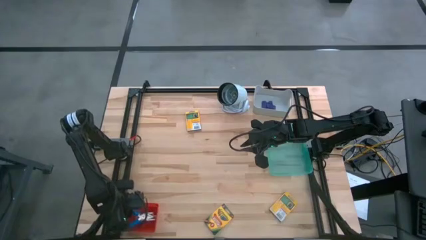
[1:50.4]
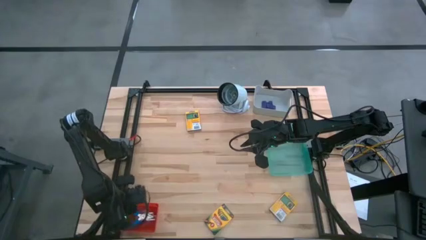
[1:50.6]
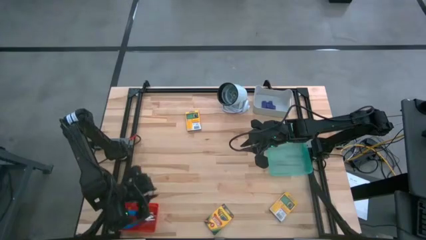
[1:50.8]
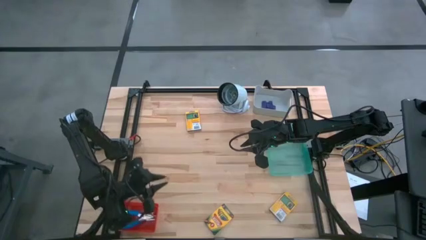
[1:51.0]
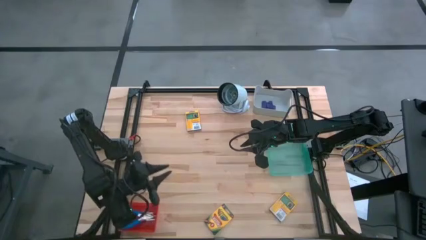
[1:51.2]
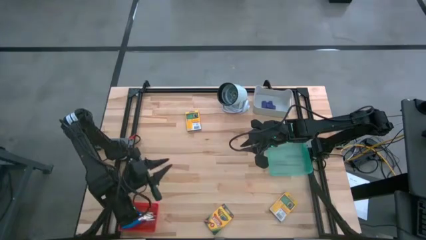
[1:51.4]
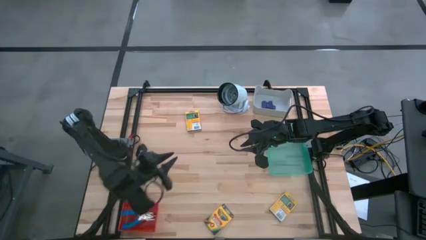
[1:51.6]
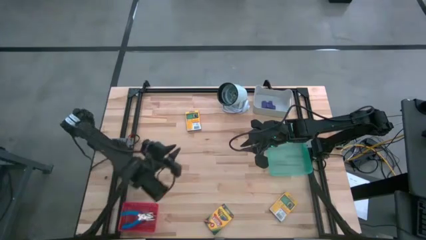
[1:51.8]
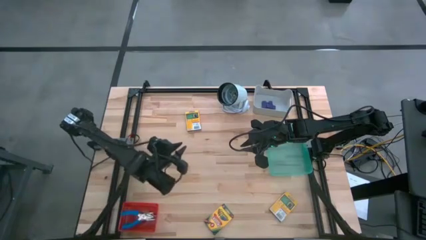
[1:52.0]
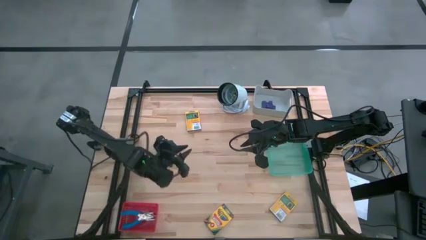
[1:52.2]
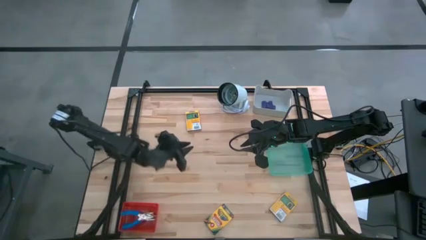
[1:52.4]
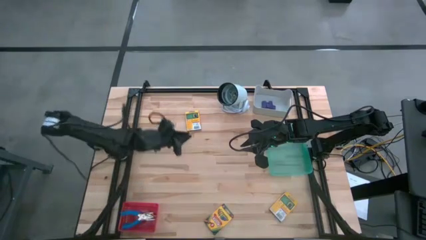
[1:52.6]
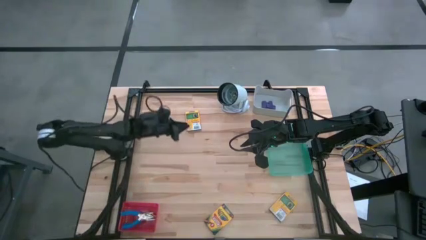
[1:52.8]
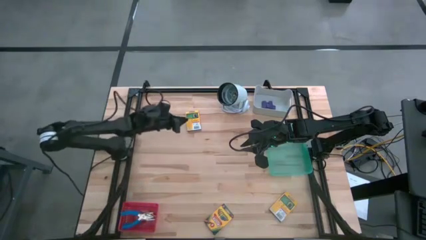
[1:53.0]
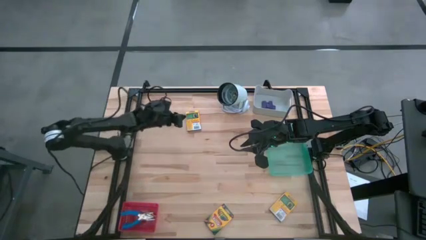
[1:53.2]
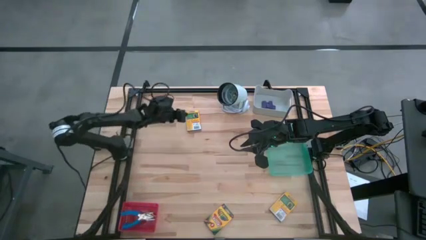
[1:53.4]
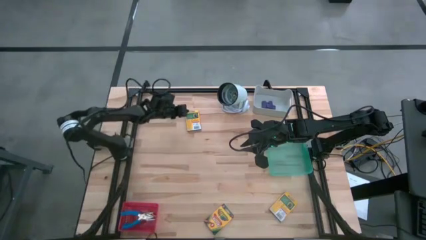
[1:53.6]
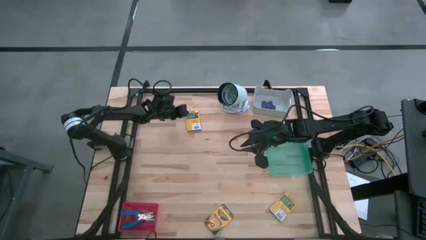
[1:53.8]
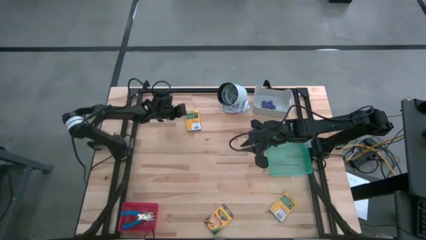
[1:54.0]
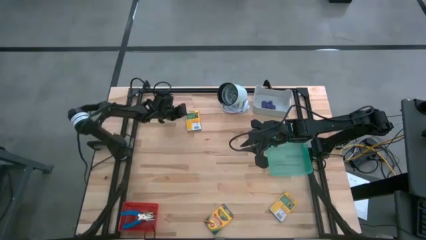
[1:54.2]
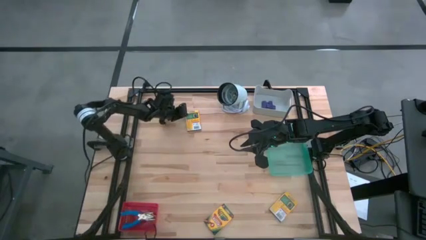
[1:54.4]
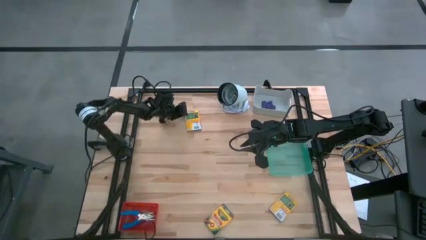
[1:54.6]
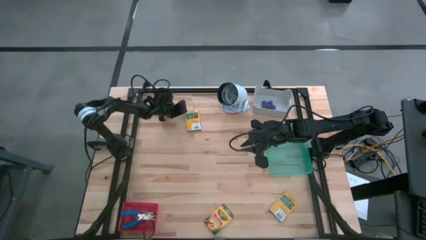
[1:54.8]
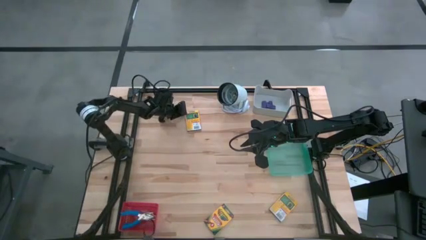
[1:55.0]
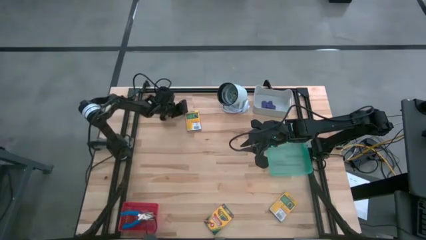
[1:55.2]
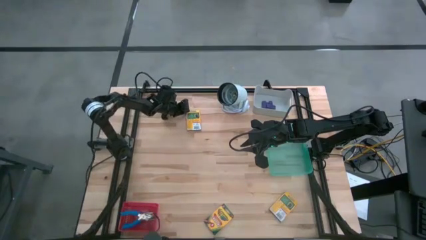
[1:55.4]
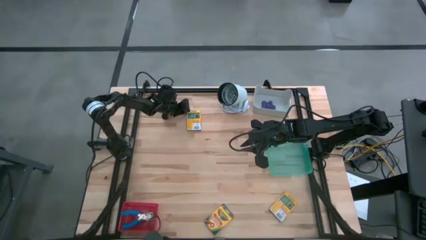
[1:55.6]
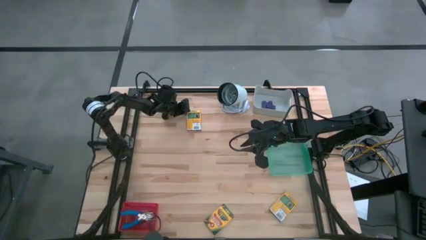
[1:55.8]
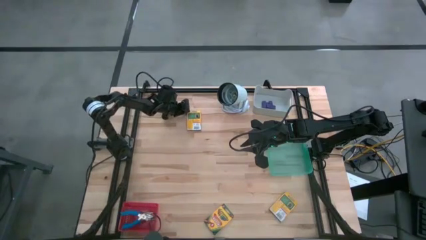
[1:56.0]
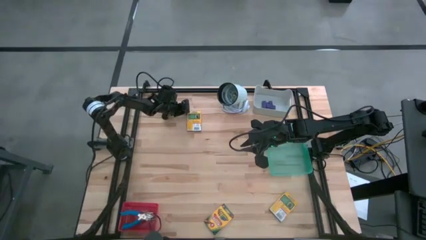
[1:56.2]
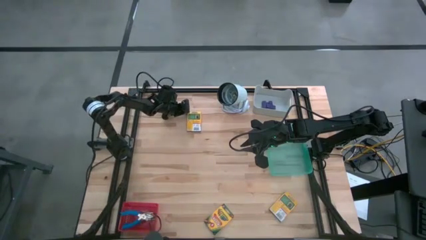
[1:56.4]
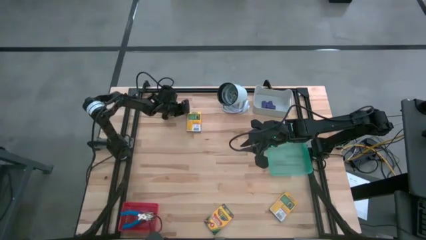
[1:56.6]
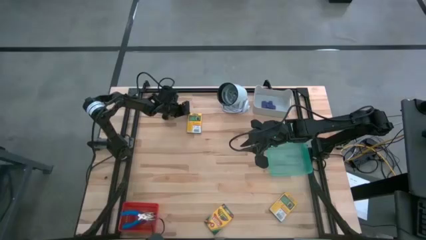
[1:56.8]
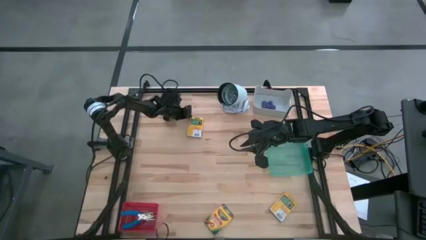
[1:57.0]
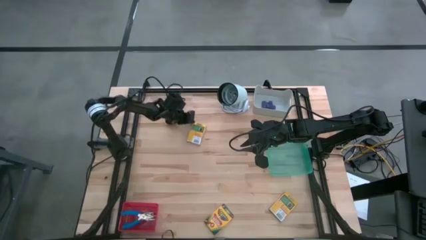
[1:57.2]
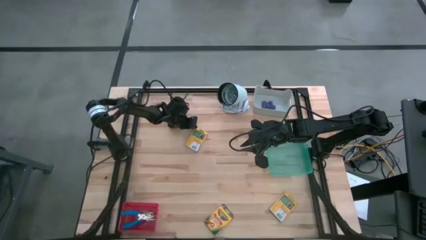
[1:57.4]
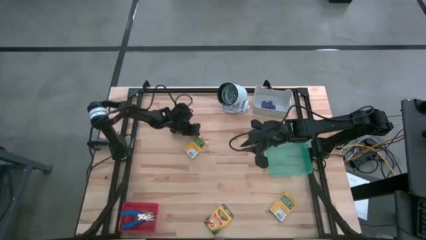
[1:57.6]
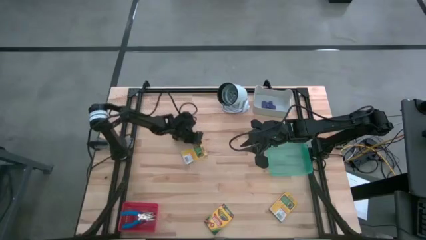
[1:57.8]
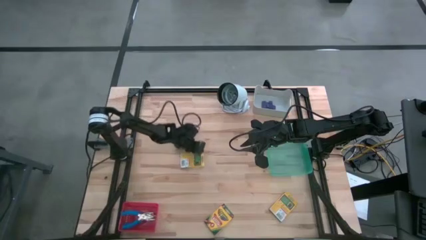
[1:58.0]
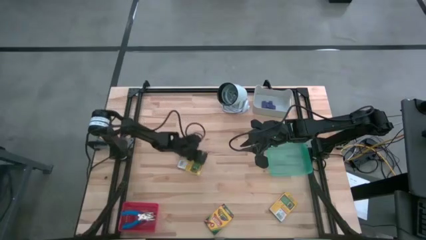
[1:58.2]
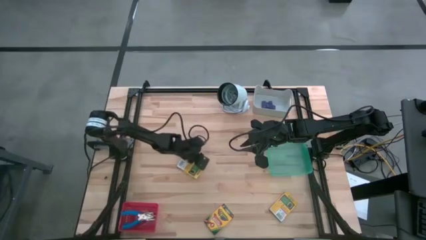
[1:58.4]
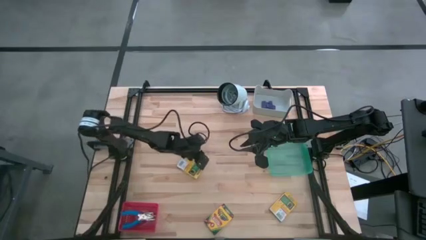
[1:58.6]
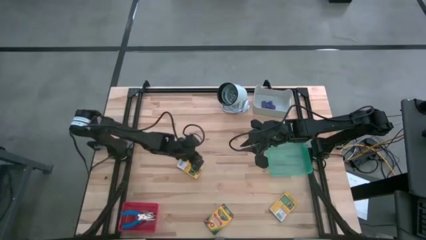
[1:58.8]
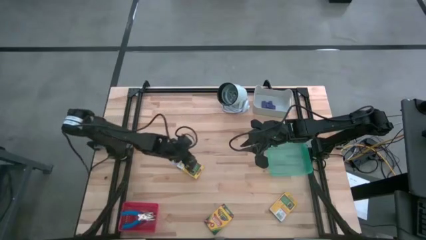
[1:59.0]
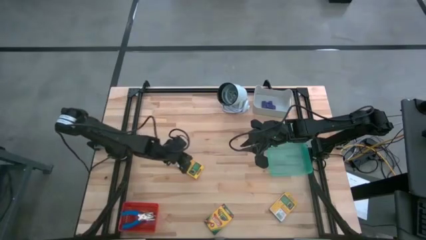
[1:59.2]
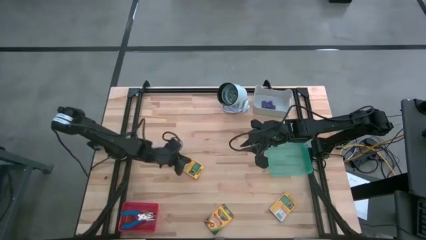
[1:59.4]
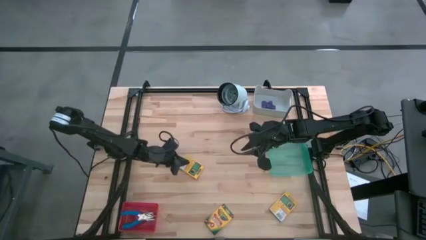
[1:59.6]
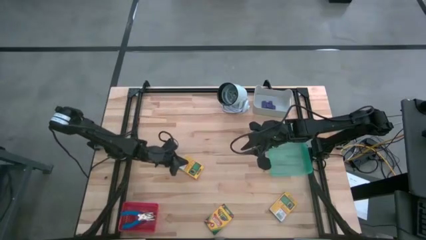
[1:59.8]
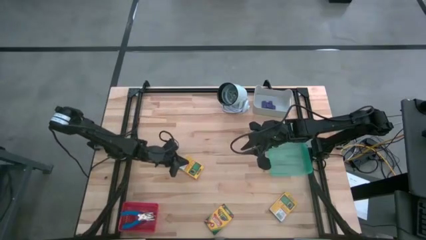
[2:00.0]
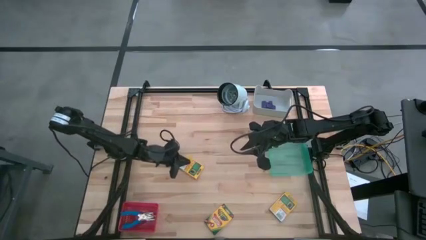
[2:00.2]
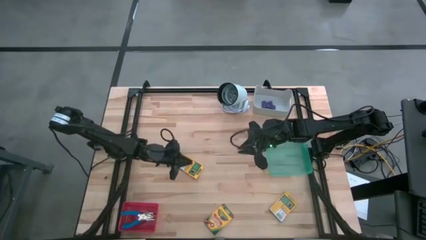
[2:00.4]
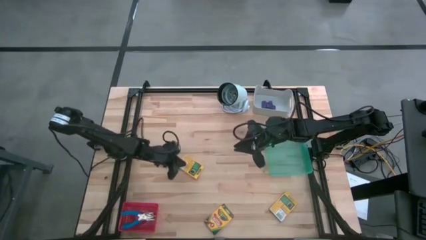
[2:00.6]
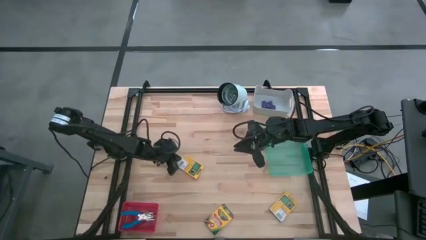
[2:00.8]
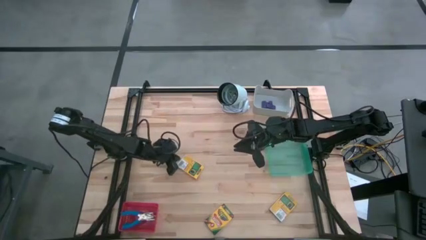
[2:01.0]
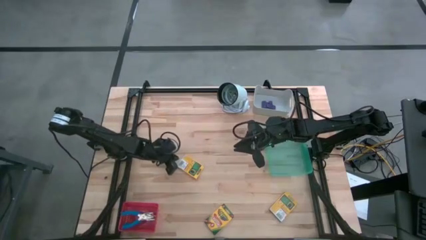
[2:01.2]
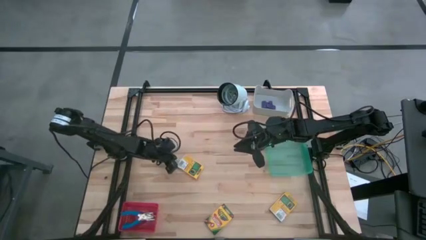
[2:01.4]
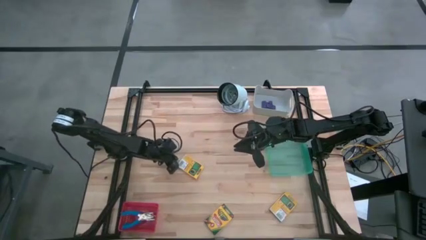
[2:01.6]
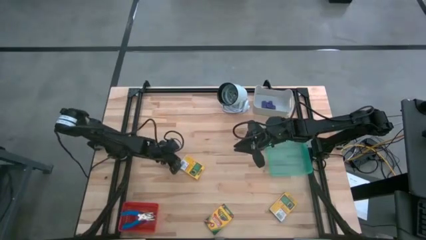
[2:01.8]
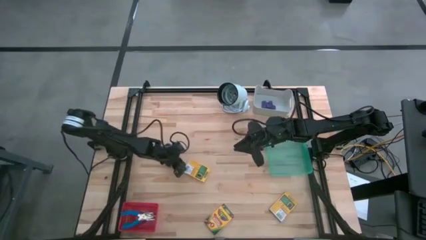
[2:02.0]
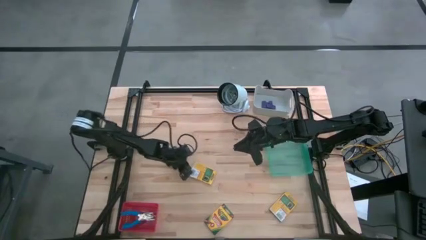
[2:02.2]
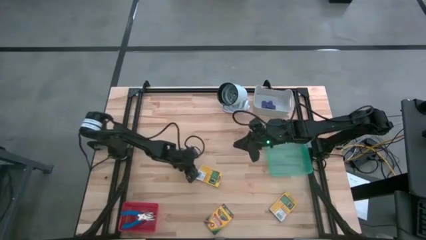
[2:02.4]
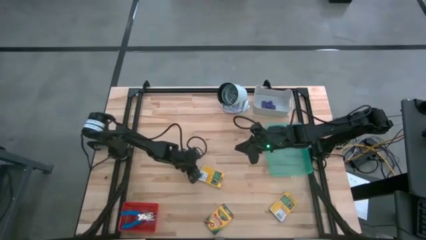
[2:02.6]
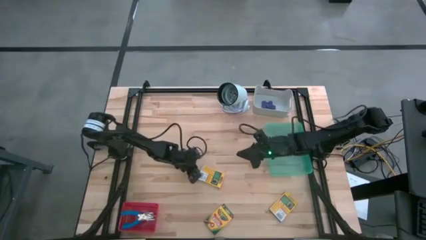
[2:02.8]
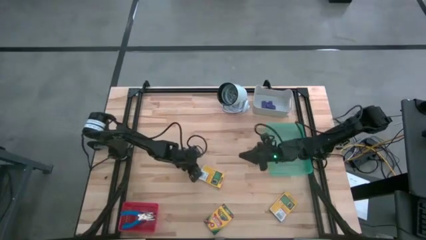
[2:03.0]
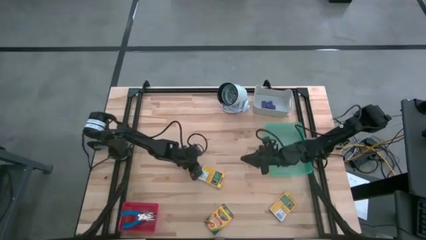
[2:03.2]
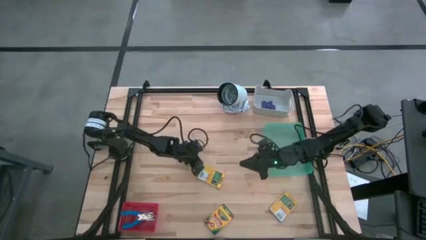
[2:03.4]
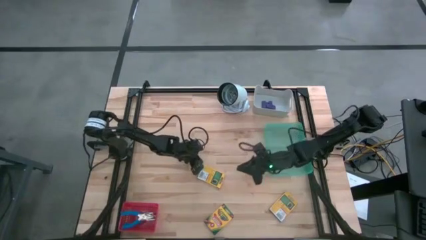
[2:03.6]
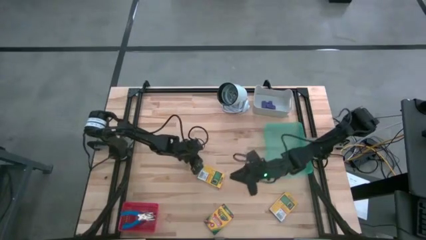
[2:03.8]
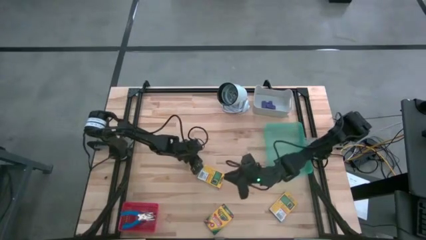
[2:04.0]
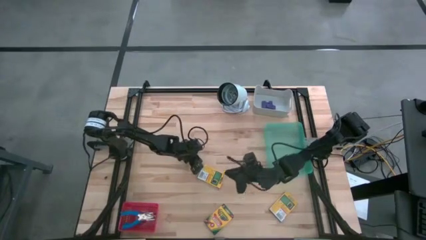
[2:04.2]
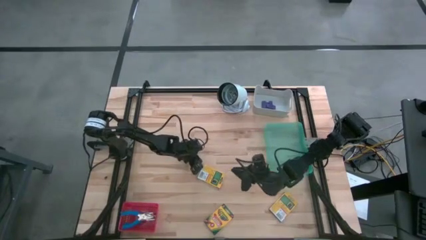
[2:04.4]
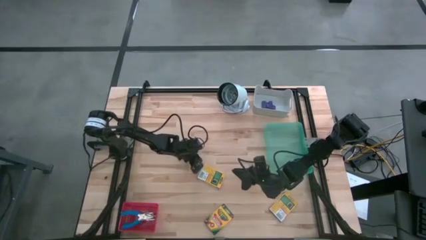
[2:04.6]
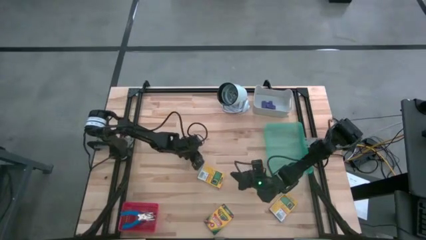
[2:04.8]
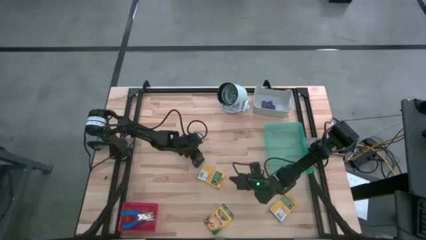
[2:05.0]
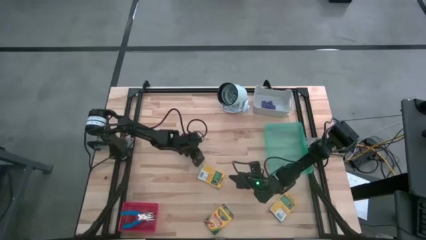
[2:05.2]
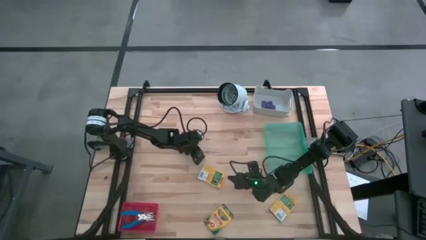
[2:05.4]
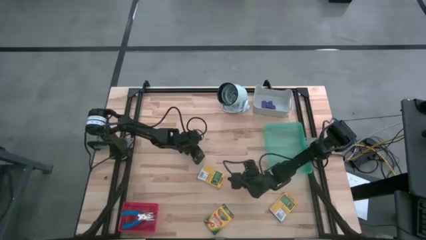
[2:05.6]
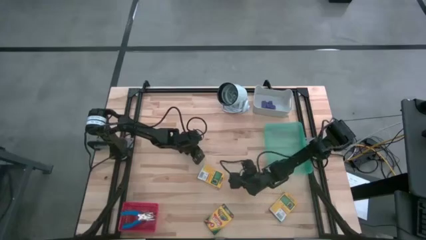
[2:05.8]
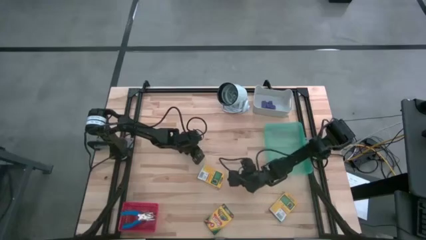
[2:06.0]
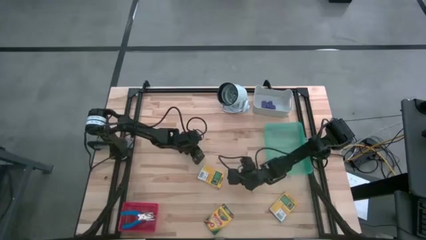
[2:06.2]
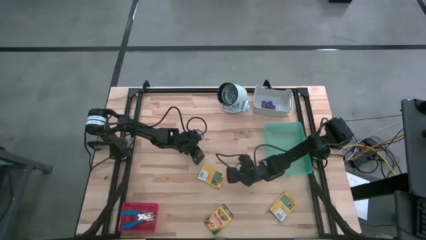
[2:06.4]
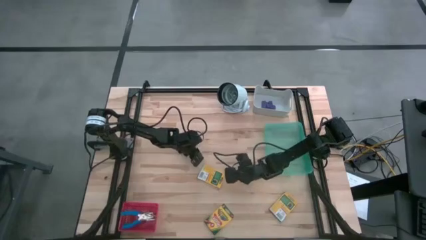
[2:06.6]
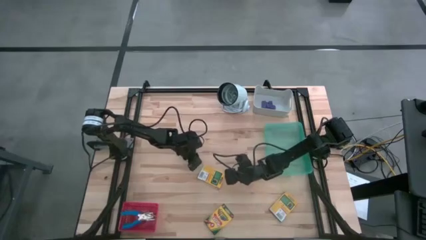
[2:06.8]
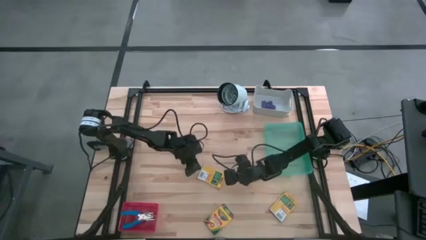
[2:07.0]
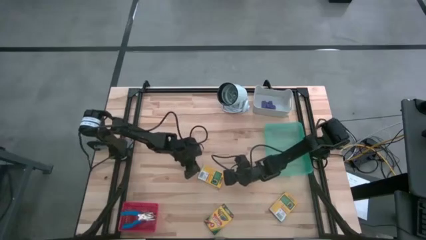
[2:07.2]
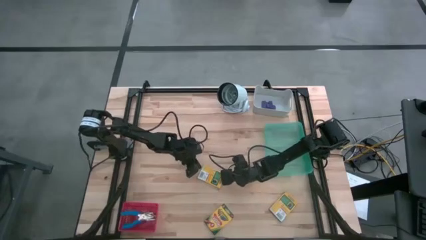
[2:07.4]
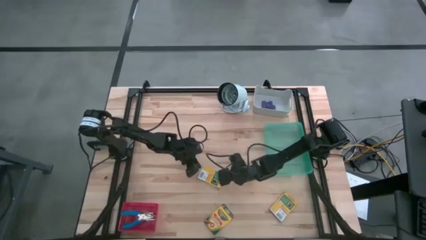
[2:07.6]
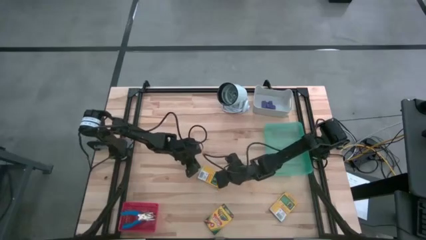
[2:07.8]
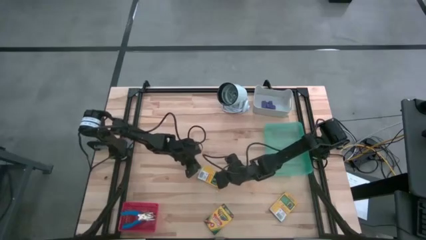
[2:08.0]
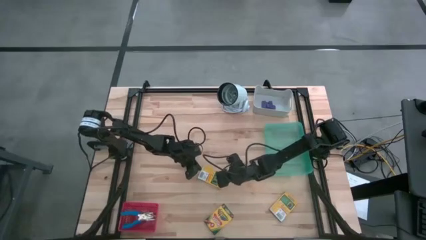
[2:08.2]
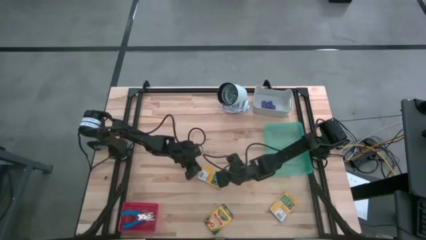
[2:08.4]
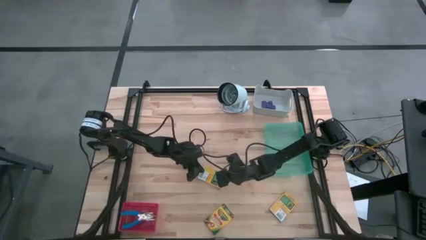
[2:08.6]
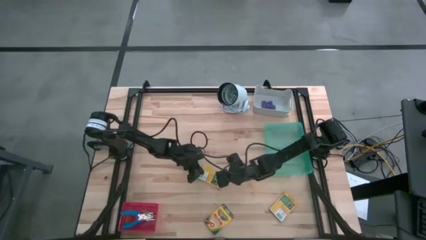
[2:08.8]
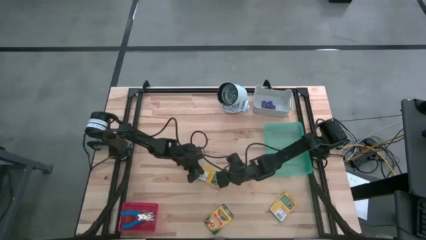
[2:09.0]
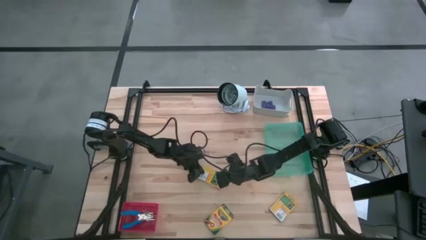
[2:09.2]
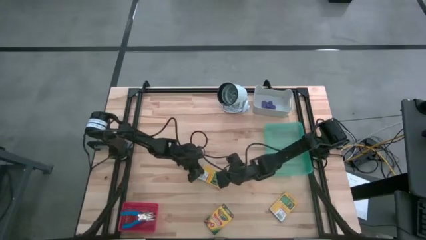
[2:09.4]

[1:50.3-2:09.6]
Task: Pick & Place School Supplies
Put the crayon box into the green bin
